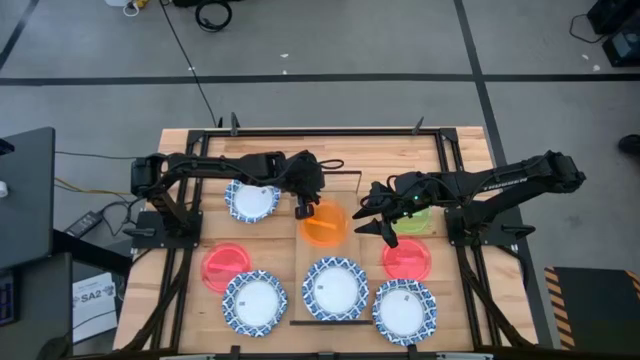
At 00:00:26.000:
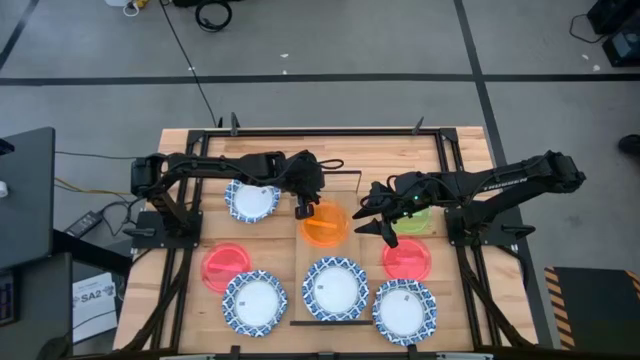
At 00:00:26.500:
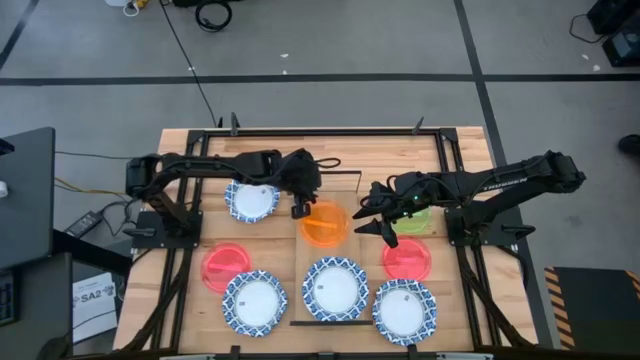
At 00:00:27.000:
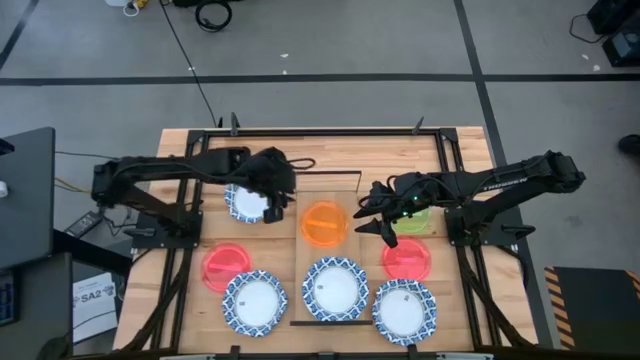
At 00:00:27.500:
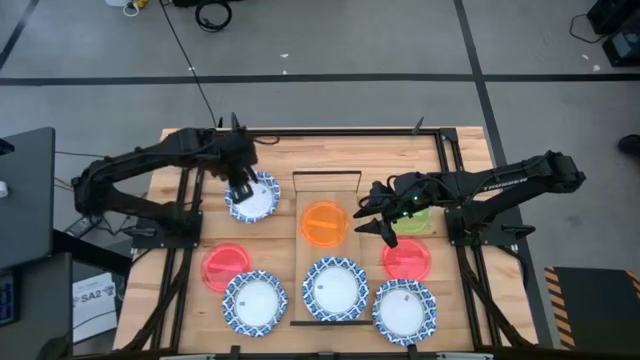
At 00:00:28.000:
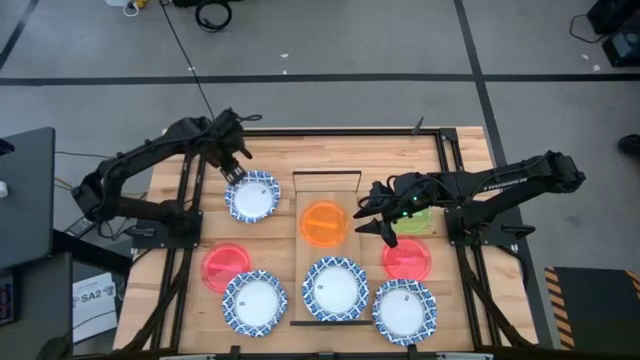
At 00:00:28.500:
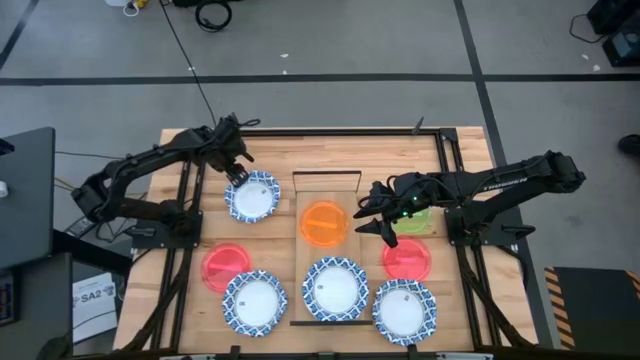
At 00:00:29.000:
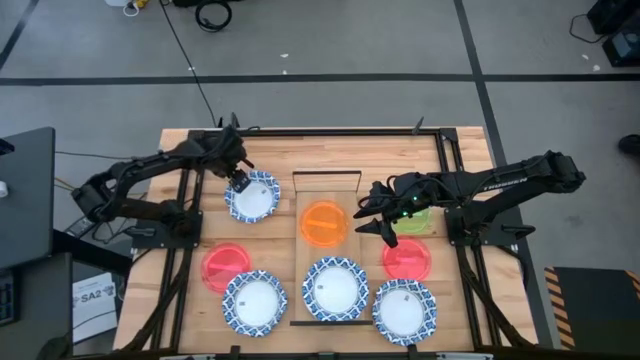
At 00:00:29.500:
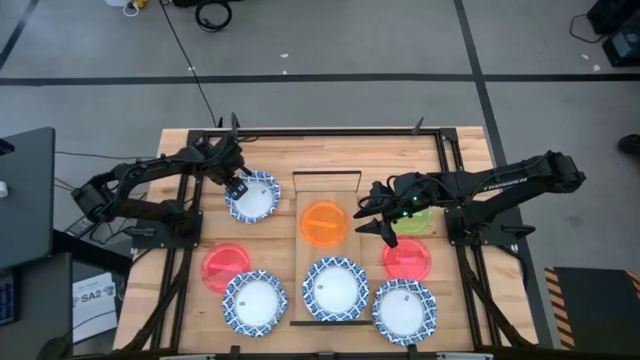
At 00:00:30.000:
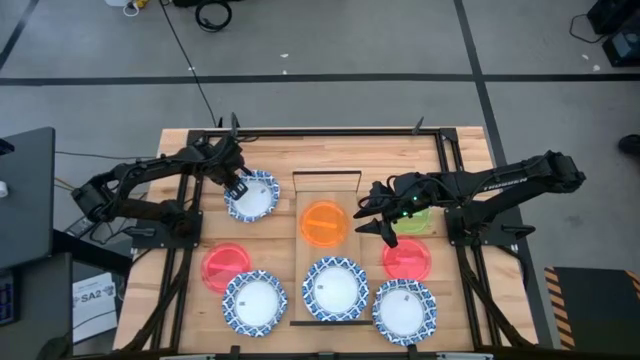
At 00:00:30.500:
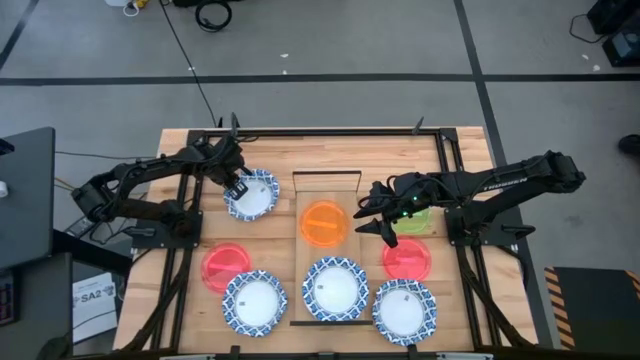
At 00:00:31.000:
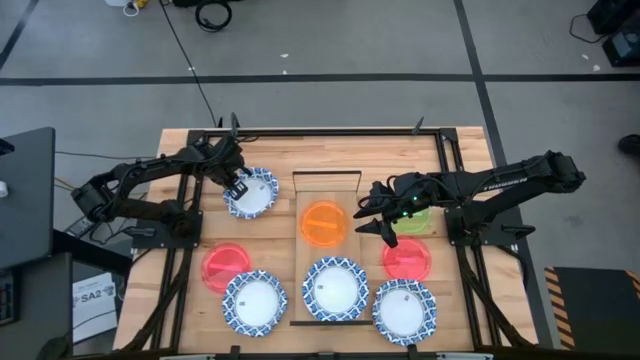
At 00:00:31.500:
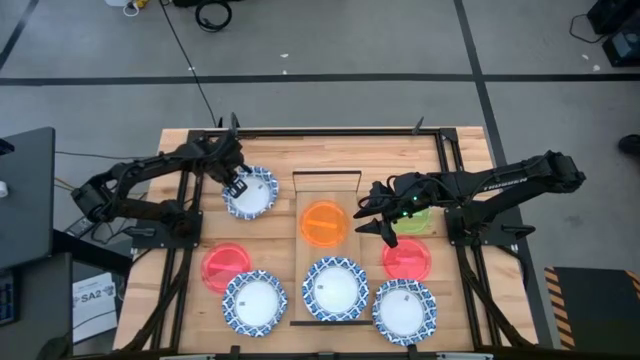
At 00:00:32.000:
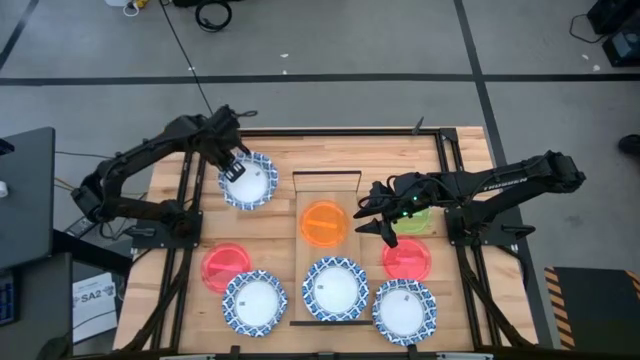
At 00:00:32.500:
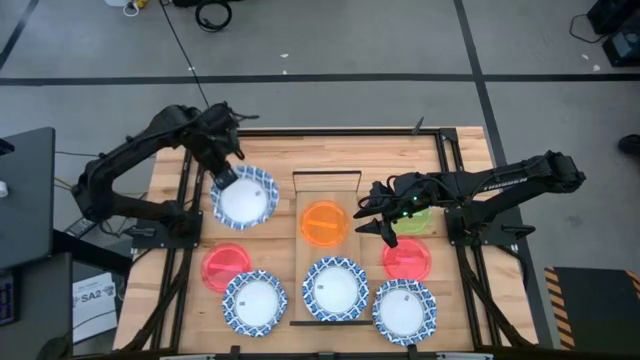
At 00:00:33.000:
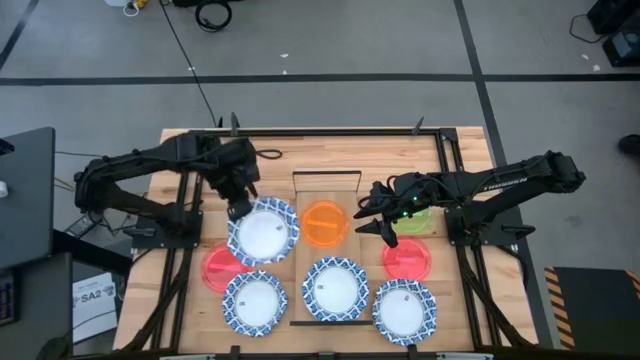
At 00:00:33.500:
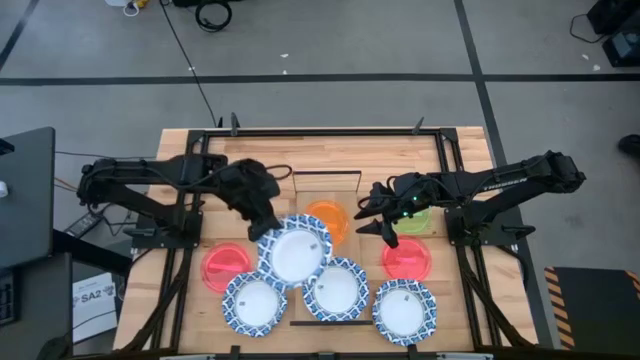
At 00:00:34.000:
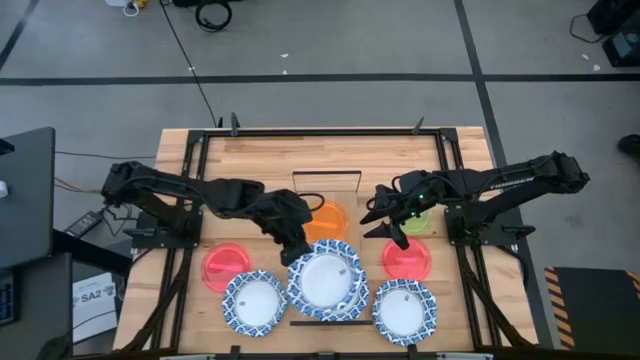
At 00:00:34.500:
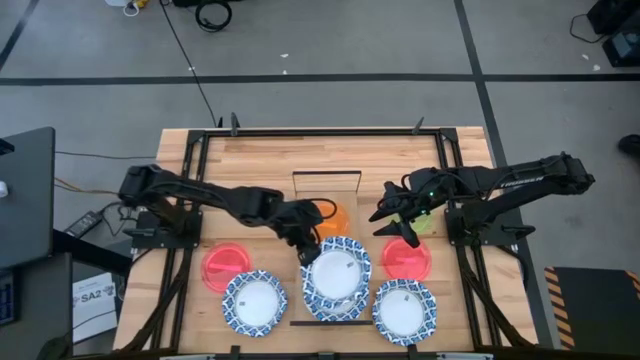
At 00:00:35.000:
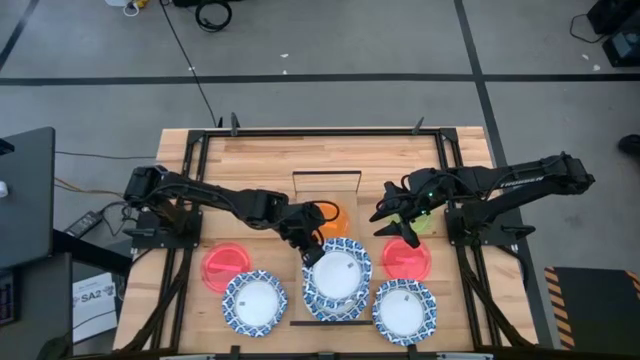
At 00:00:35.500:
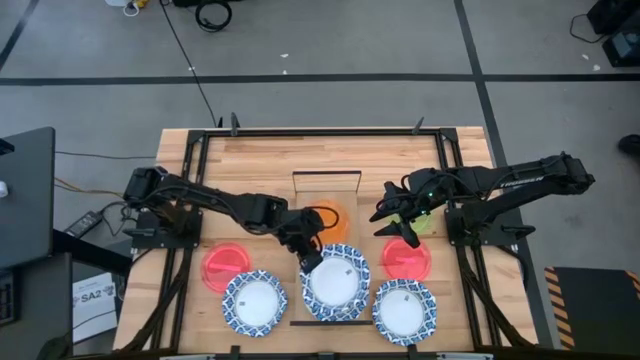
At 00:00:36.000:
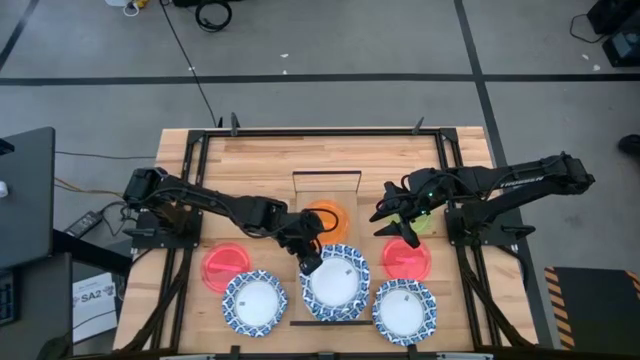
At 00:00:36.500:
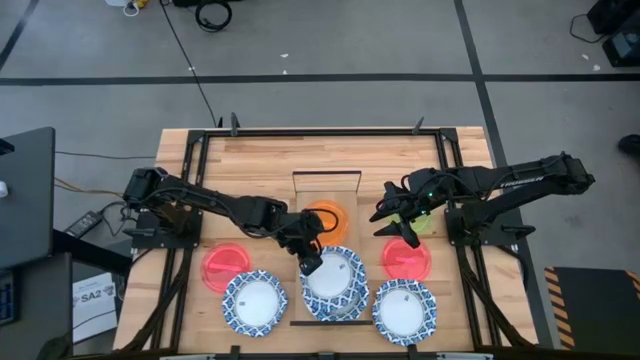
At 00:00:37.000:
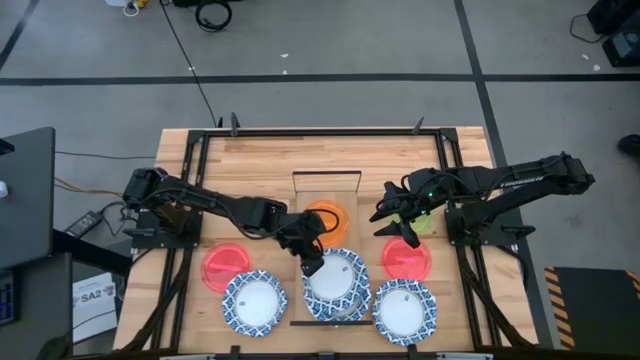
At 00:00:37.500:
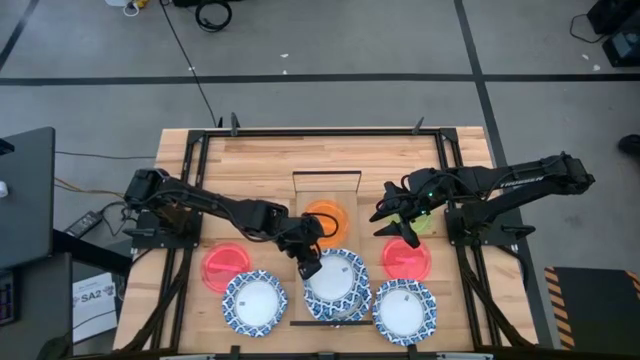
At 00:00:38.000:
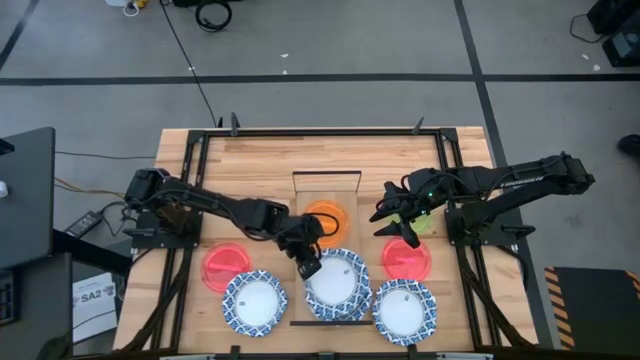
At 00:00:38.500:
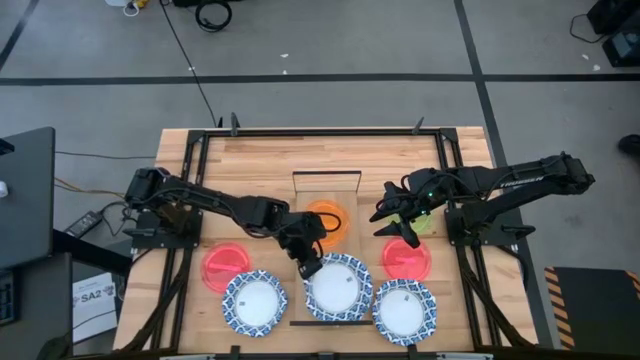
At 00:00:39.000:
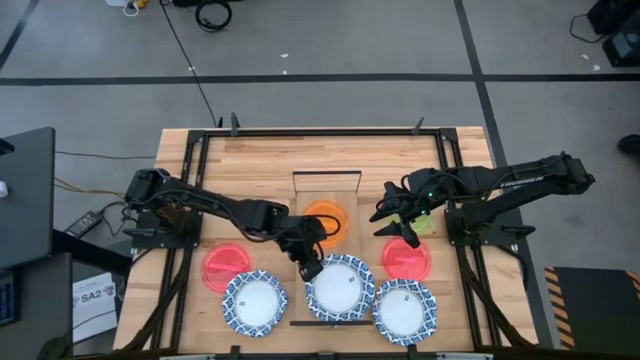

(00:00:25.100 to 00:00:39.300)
Task: Place and stack plates onto a shelf
Stack the blue patterned bowl on the blue patterned bowl on the shelf

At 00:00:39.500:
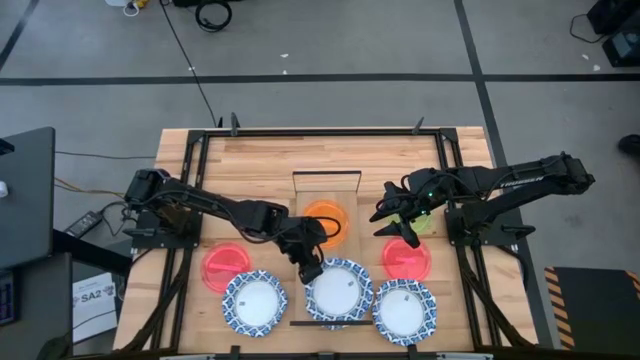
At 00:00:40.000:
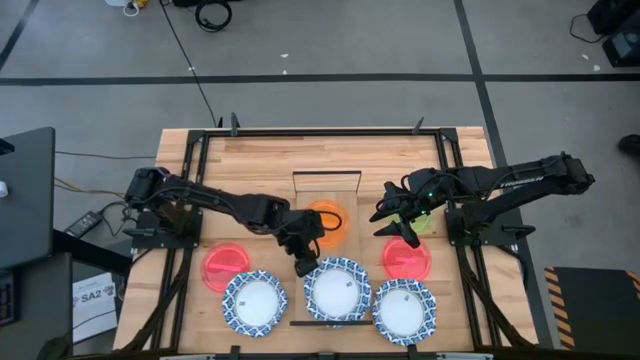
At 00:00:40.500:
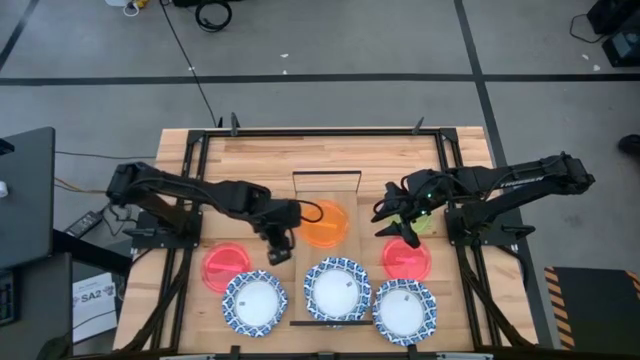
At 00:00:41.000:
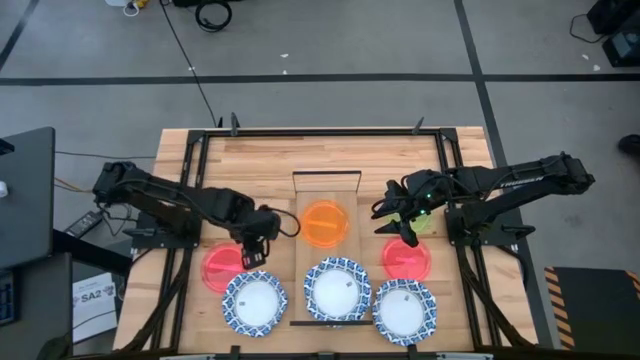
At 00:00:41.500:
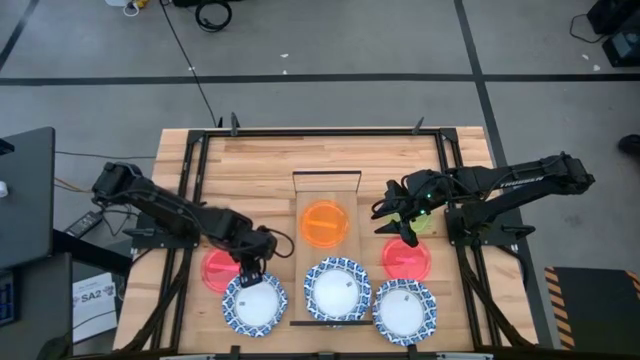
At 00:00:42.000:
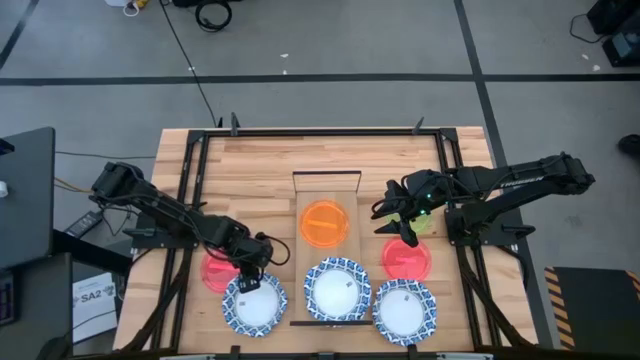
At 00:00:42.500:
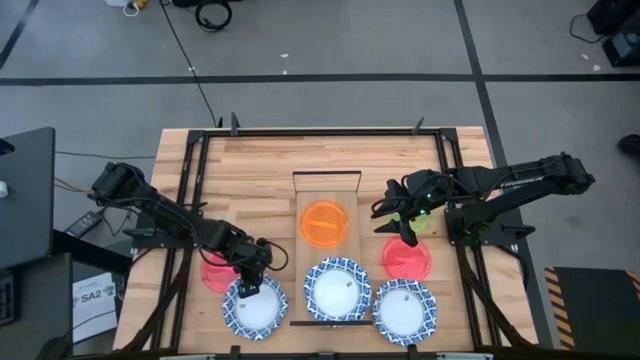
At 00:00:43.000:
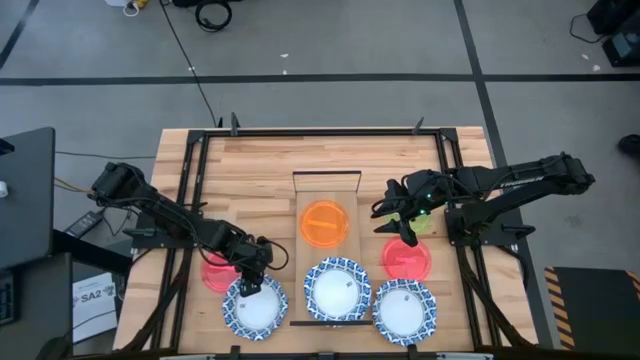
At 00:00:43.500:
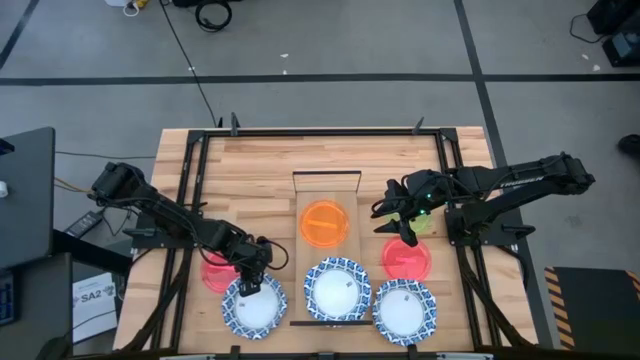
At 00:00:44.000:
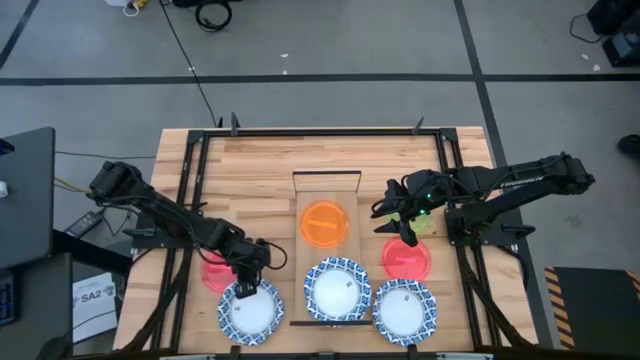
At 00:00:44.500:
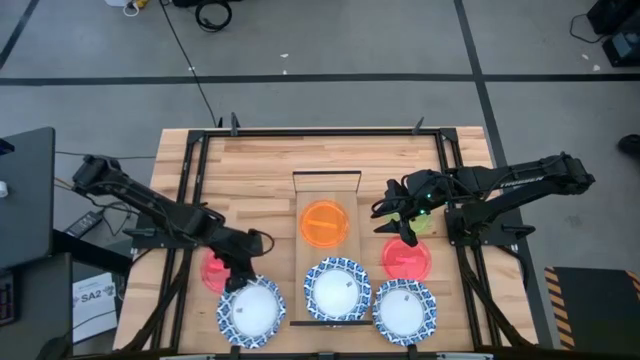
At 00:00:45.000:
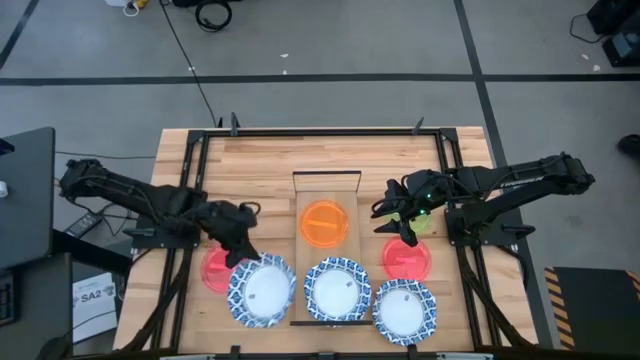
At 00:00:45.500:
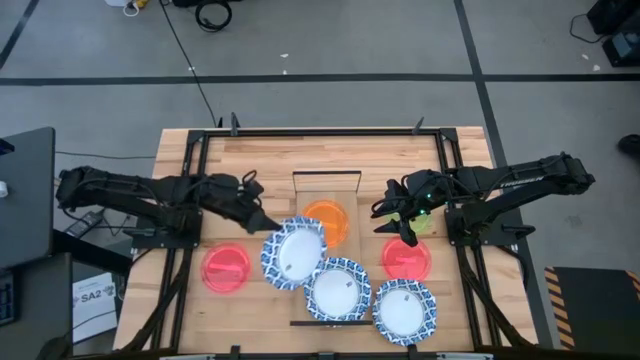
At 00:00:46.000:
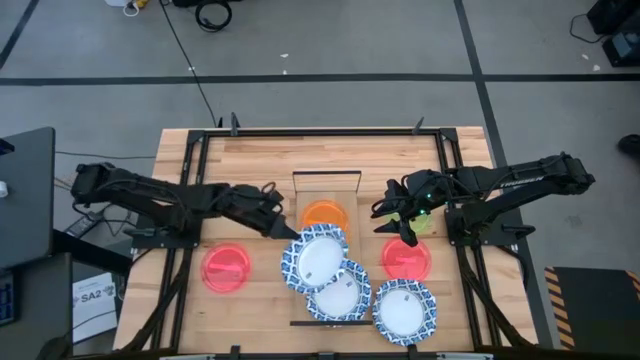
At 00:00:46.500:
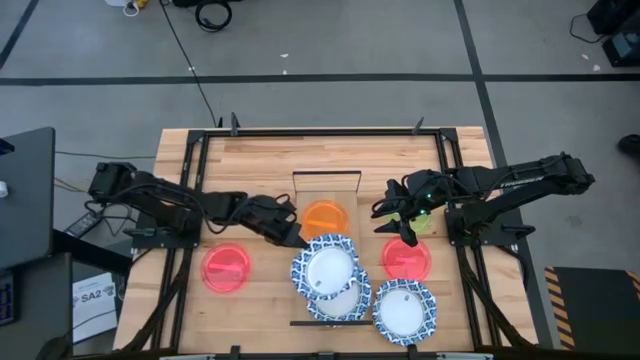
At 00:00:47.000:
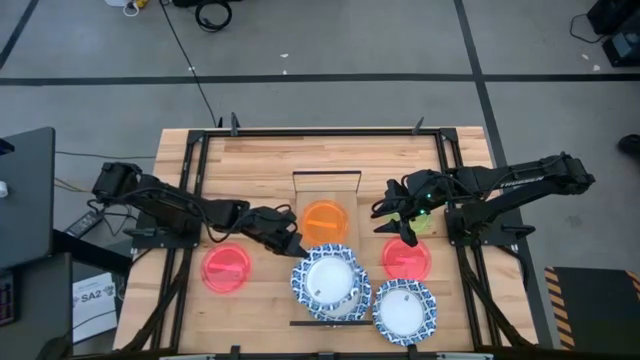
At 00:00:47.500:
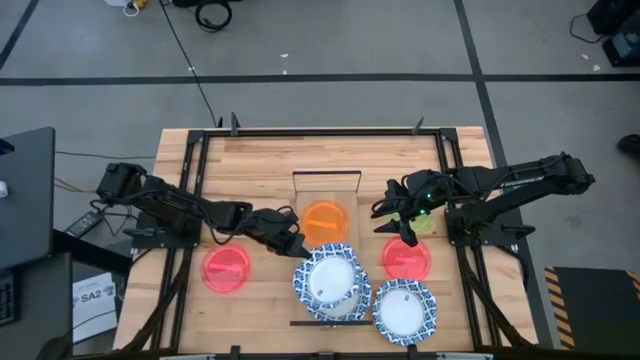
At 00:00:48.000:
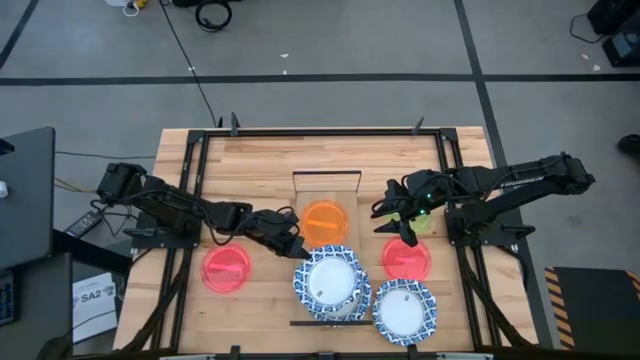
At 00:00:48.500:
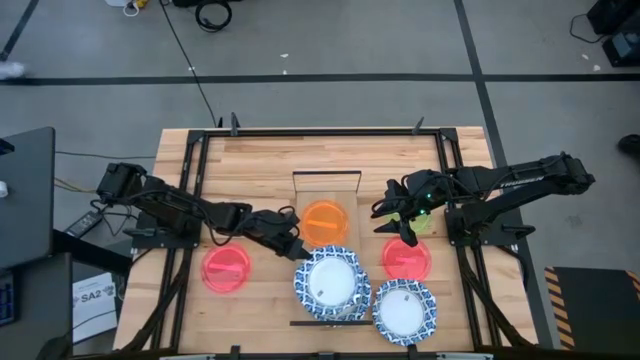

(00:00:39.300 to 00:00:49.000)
Stack the blue patterned bowl on the blue patterned bowl on the shelf
